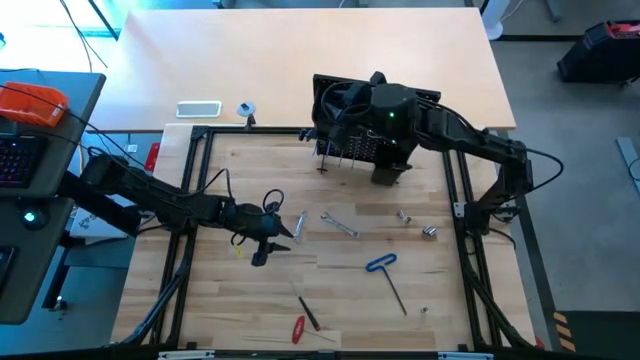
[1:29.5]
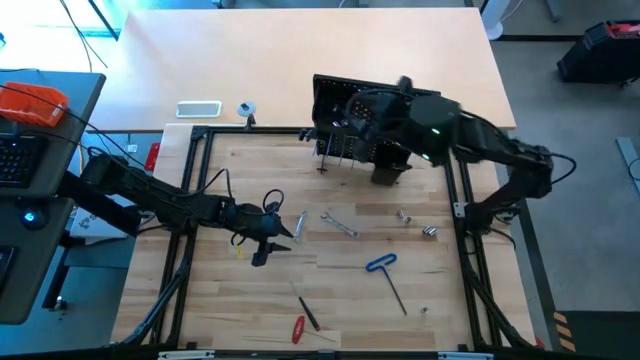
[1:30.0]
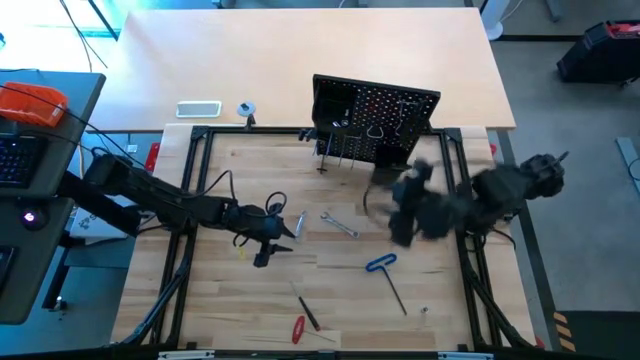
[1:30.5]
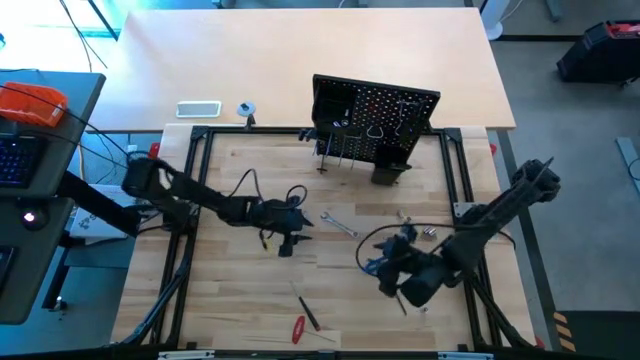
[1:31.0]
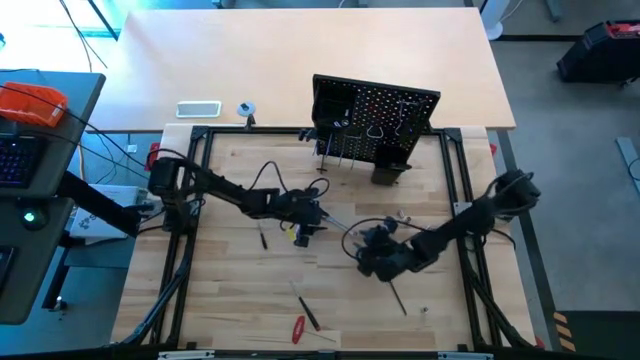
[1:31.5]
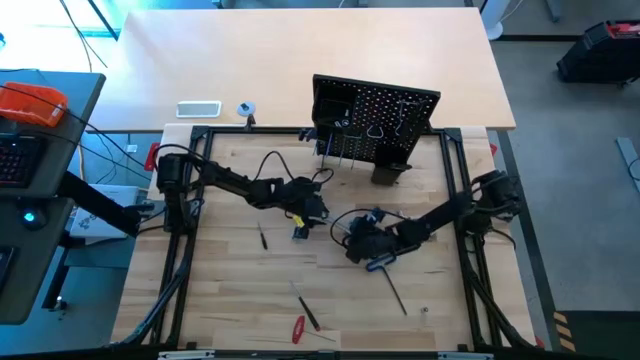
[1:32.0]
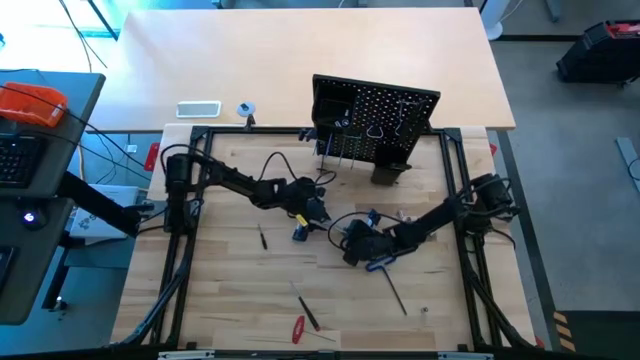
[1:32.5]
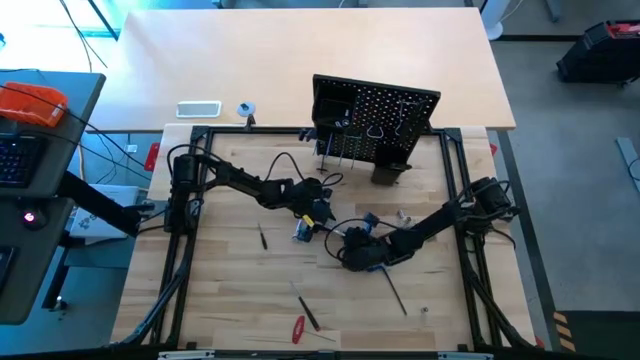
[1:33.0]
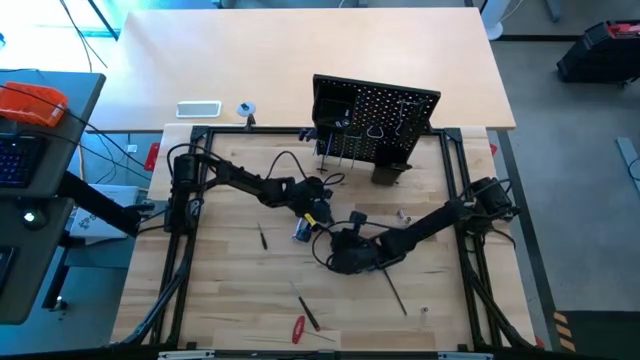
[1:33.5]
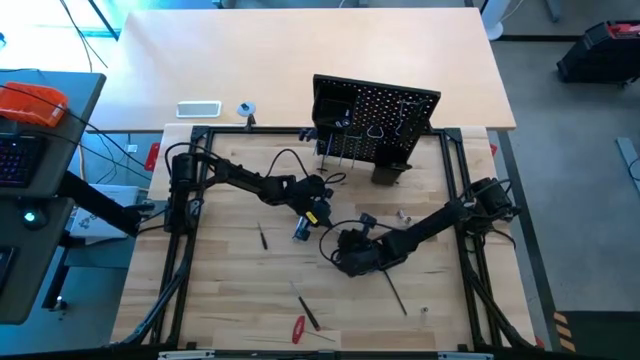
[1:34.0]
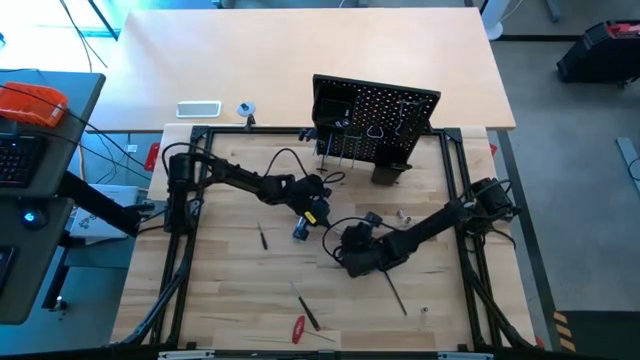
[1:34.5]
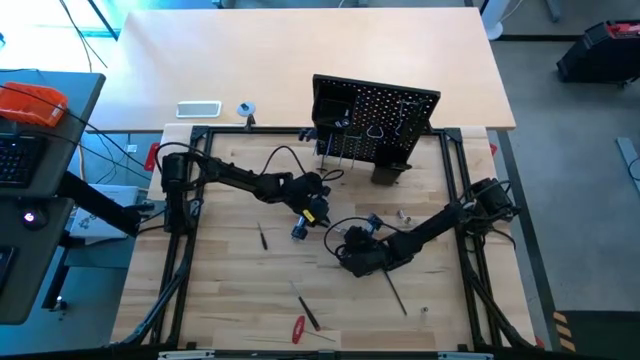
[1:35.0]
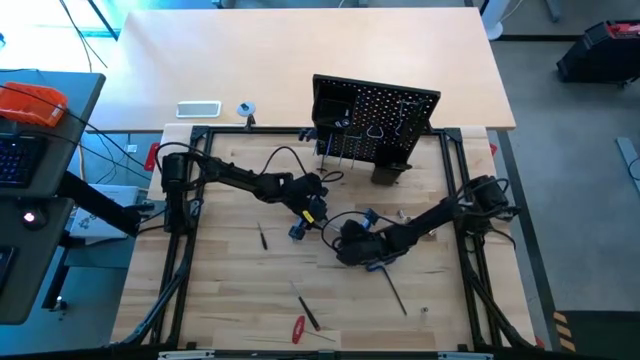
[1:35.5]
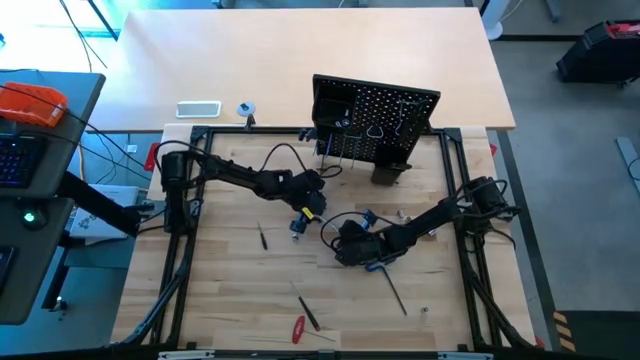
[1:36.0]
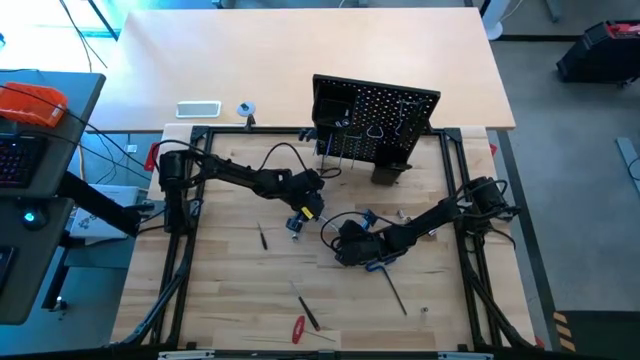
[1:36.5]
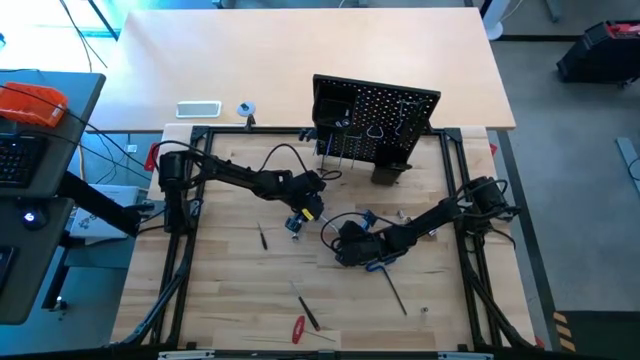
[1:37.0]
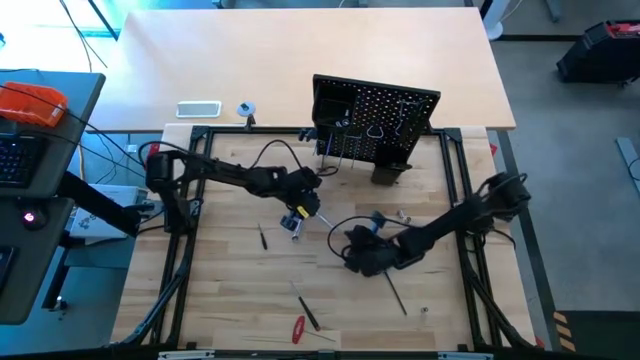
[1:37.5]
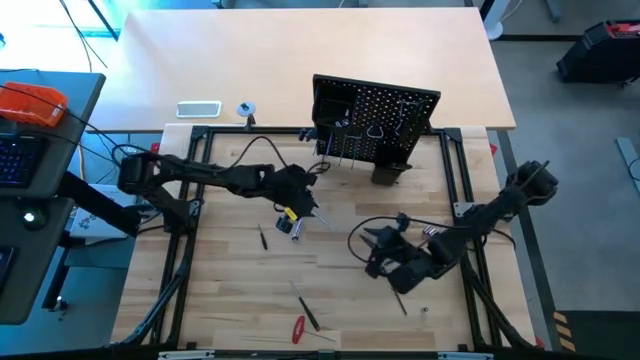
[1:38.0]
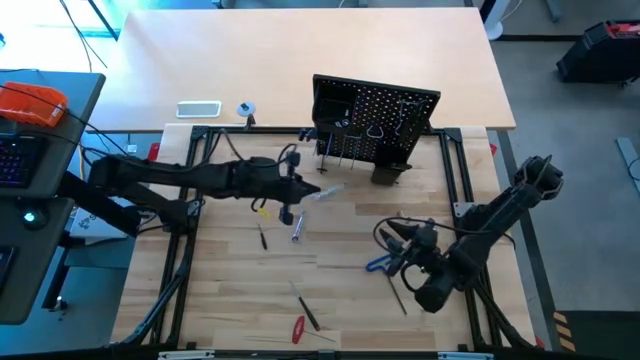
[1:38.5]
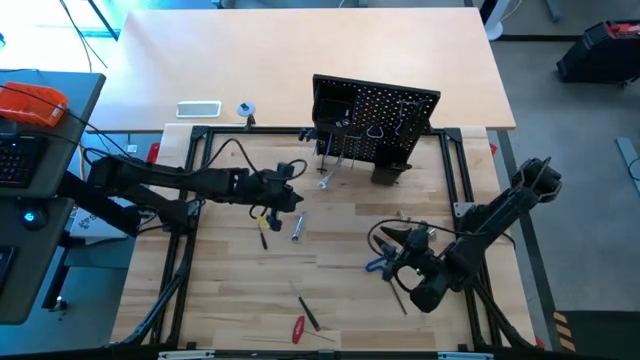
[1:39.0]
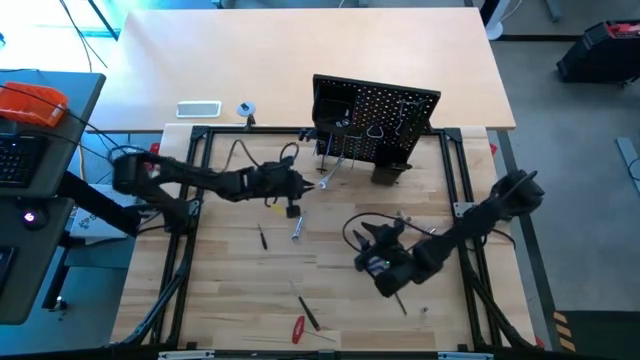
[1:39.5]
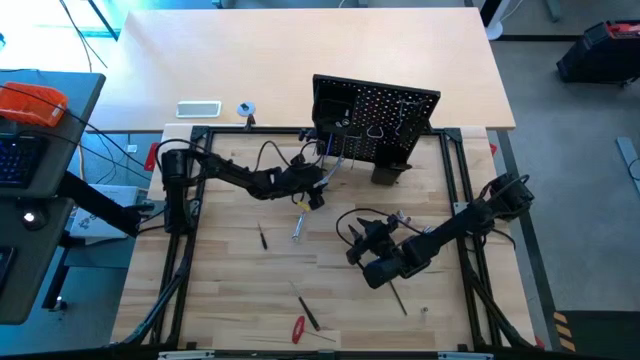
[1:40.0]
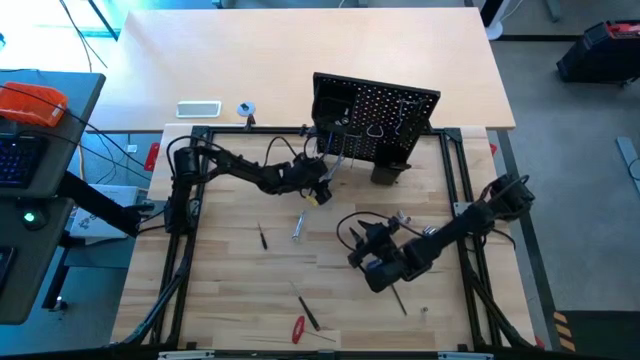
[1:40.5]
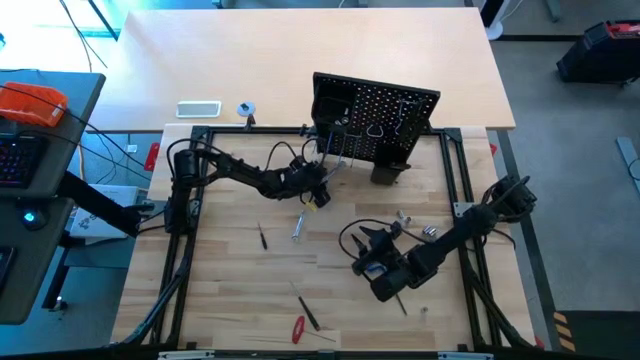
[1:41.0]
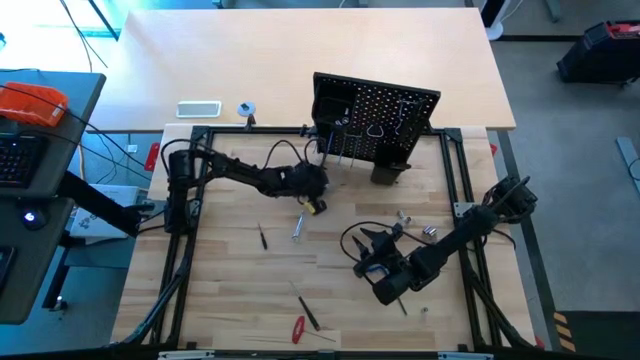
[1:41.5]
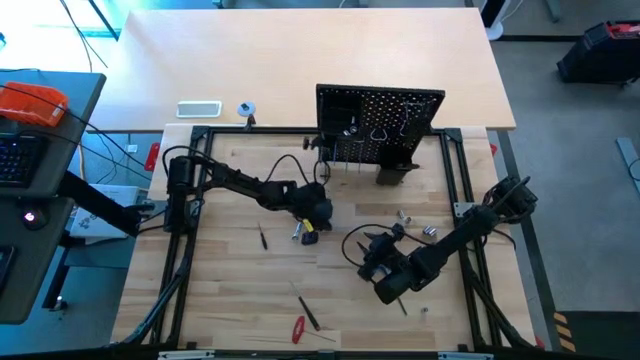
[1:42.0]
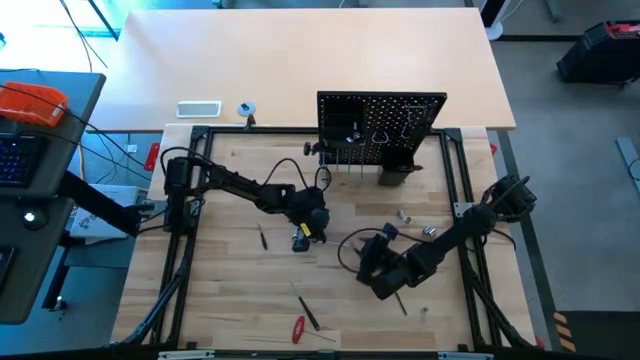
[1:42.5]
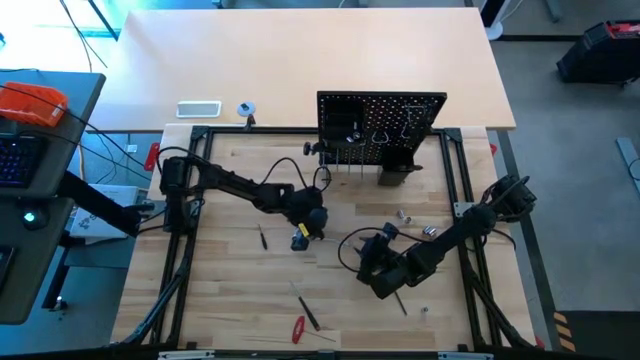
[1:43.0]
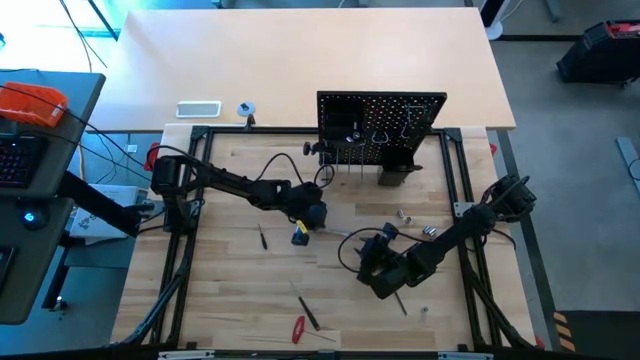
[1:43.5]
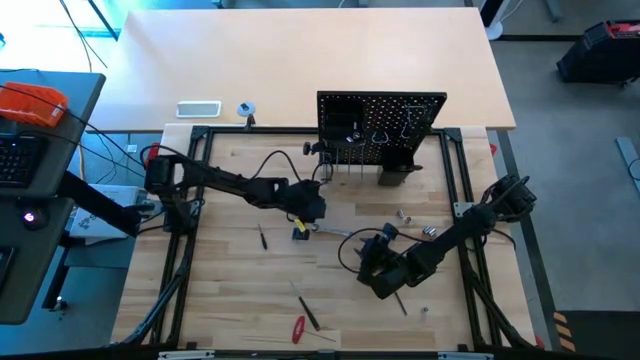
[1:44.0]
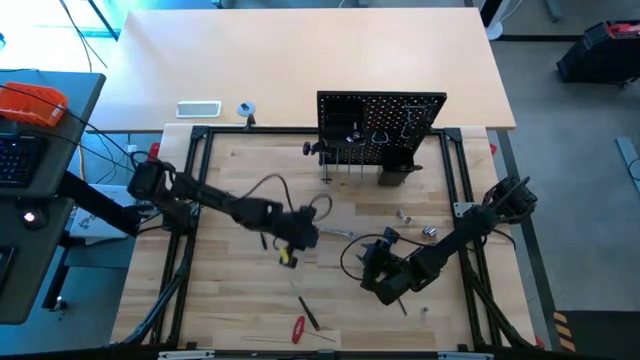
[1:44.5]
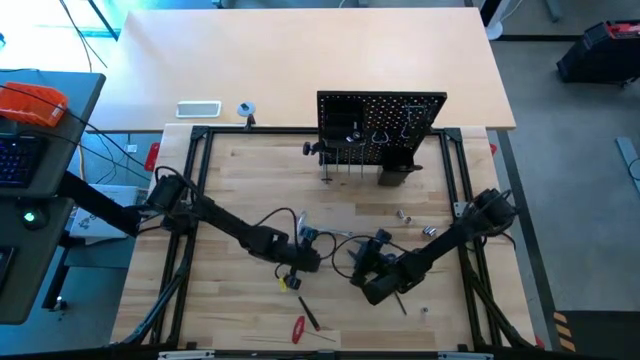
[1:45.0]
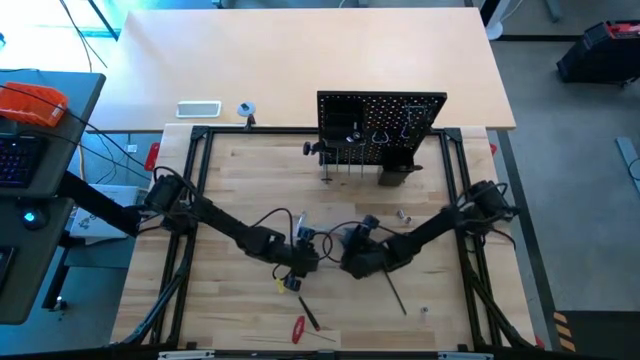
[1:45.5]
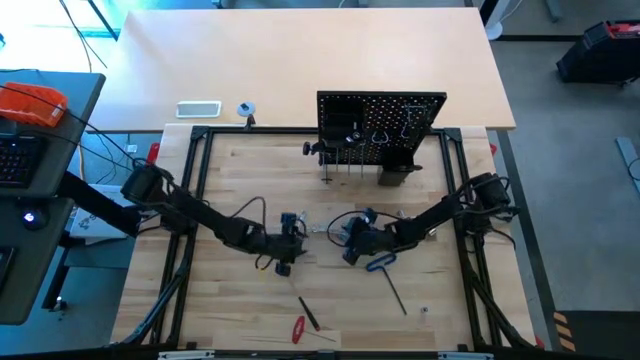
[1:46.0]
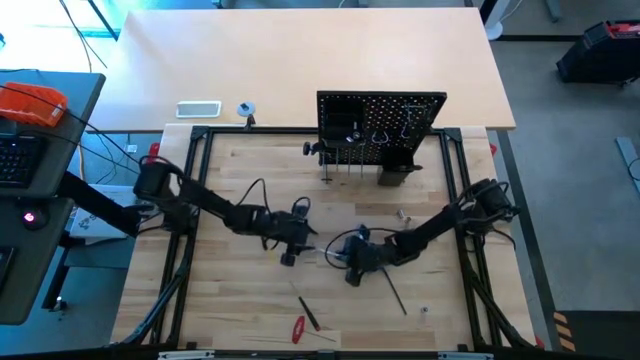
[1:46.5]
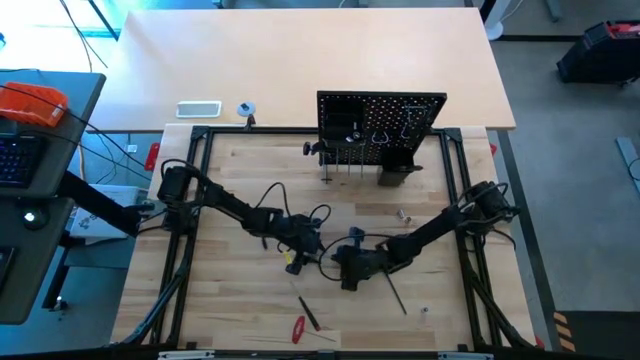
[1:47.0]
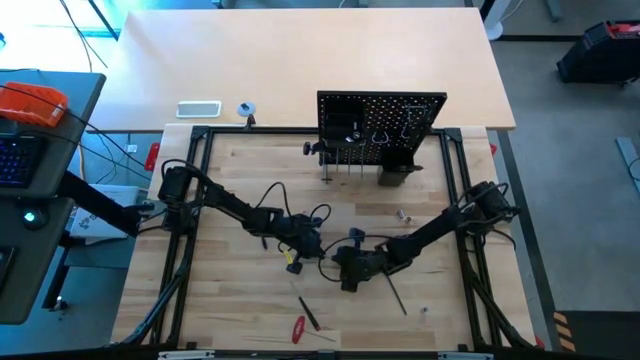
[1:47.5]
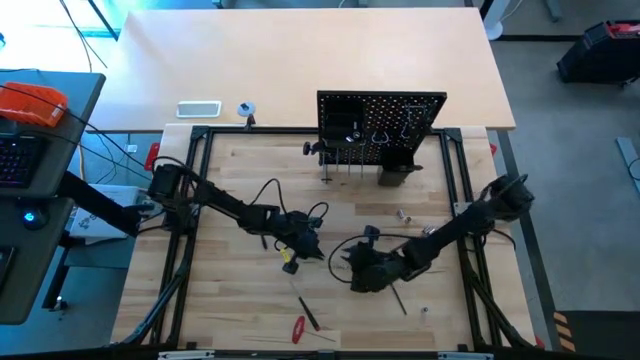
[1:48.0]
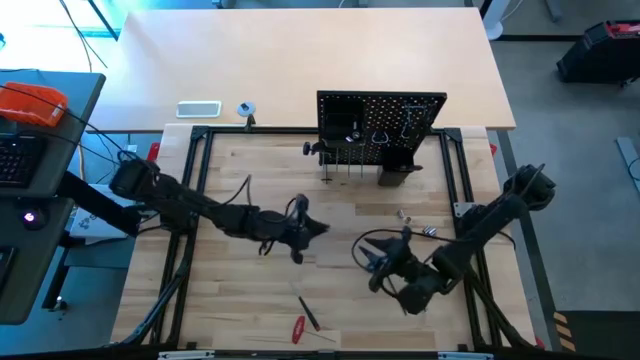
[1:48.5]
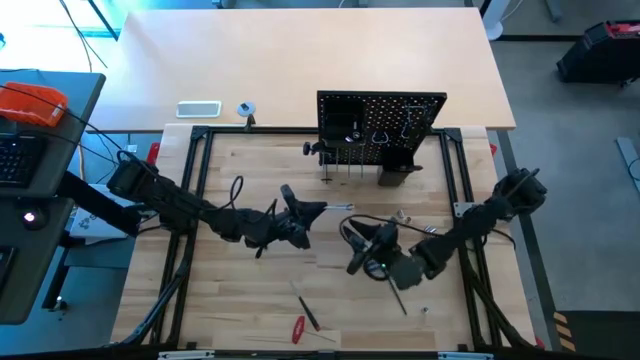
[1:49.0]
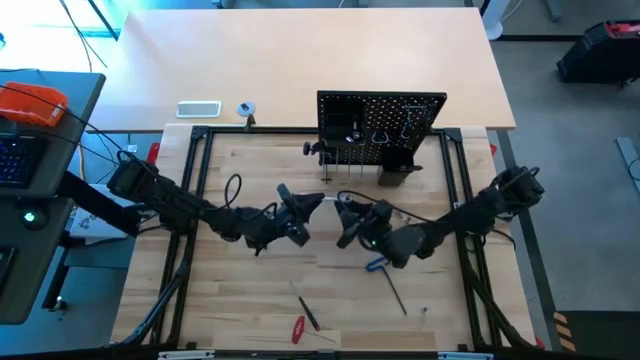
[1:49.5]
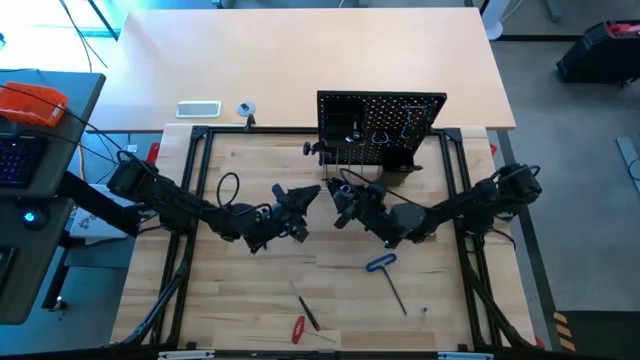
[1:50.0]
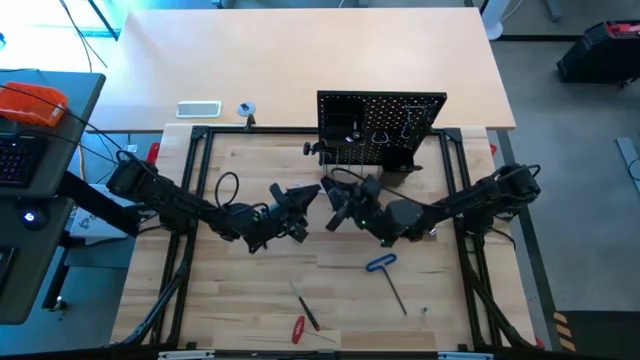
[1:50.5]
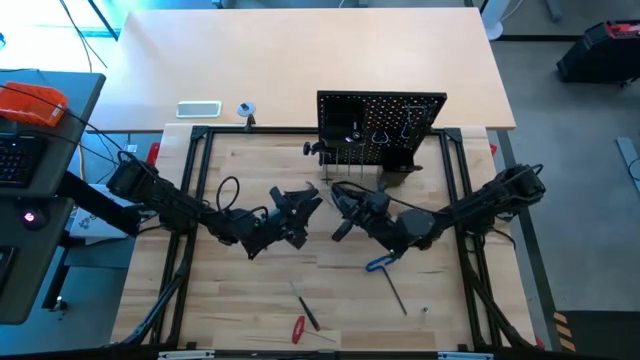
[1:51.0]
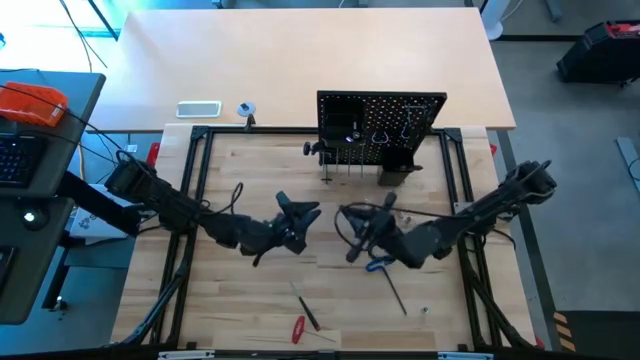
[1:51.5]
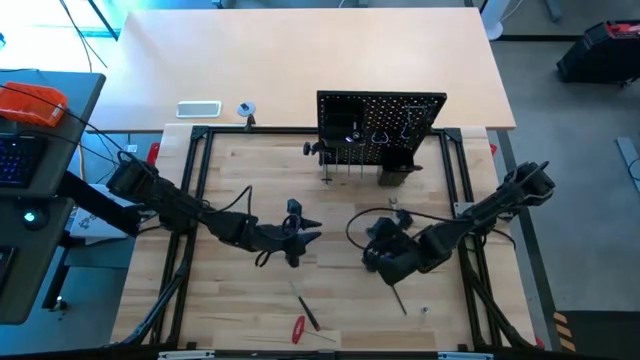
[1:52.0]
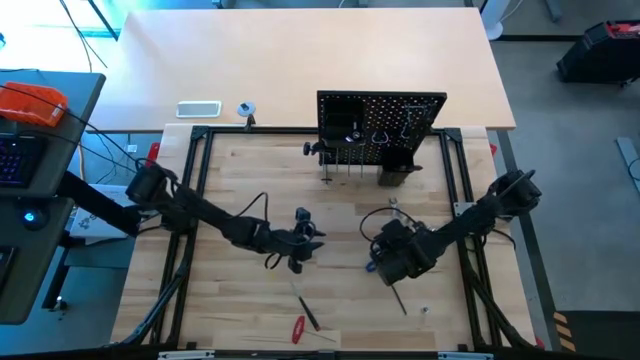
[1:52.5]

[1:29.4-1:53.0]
Task: Hang tools onto peg board
Hang the silver combination wrench onto the pegboard
